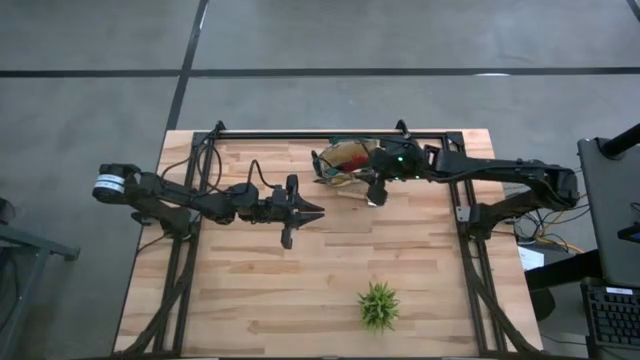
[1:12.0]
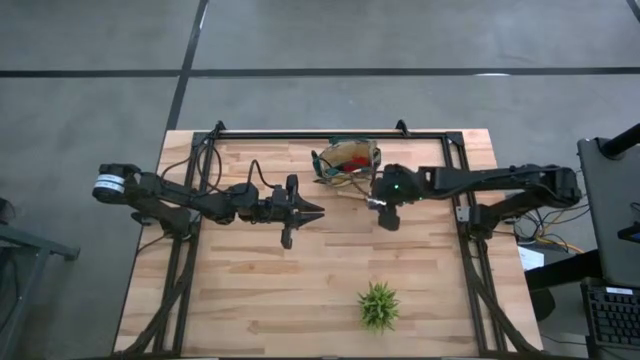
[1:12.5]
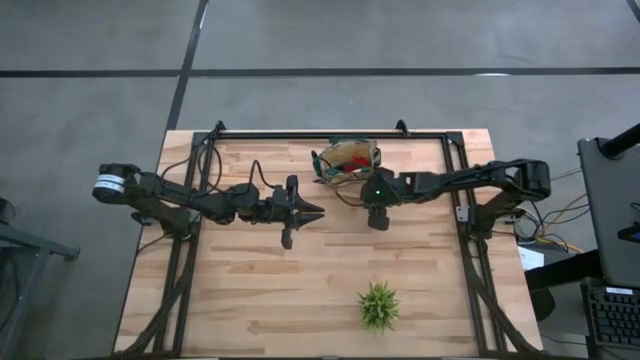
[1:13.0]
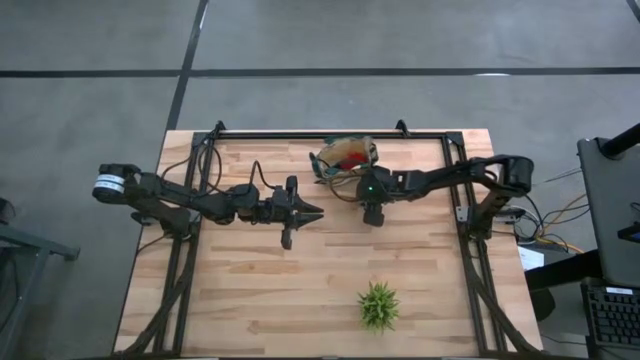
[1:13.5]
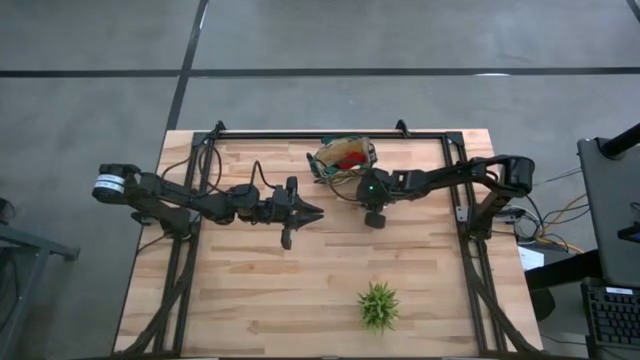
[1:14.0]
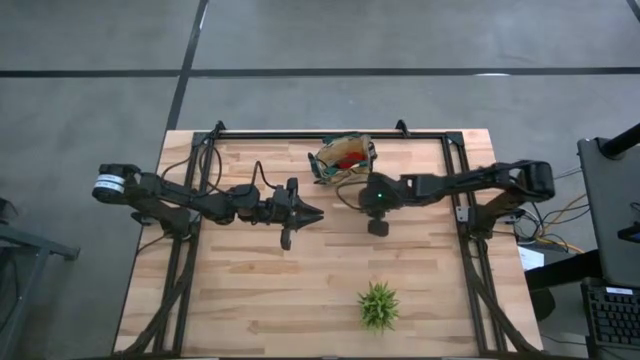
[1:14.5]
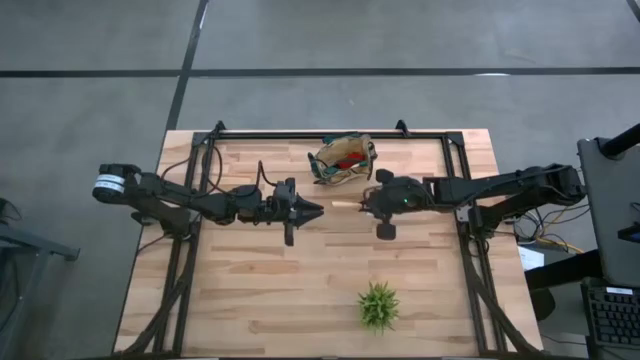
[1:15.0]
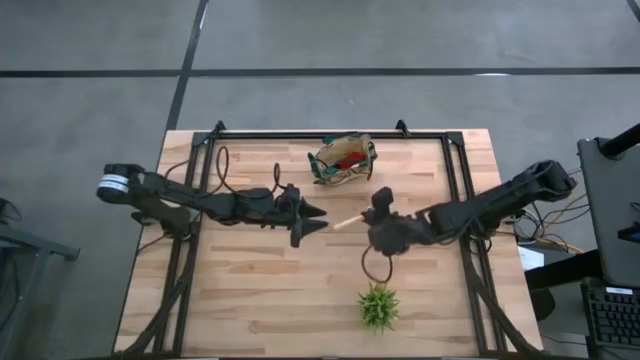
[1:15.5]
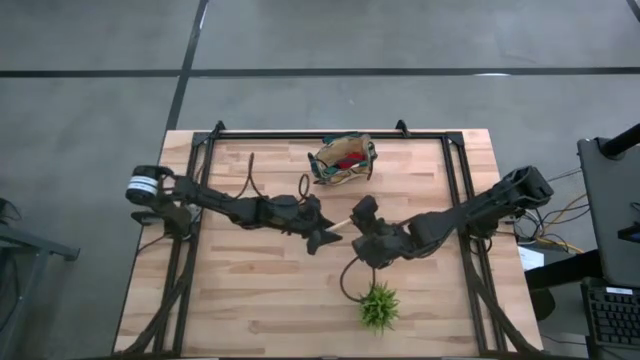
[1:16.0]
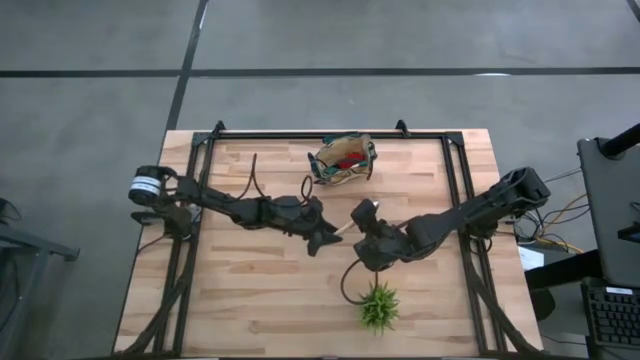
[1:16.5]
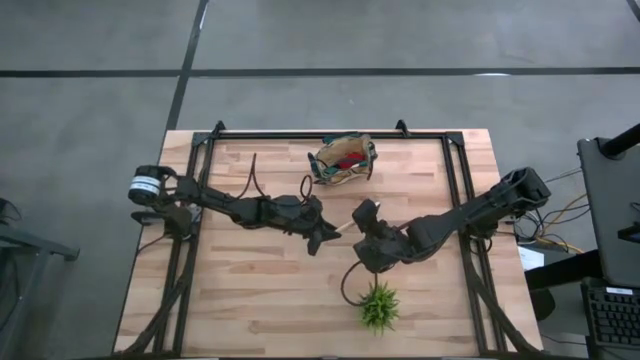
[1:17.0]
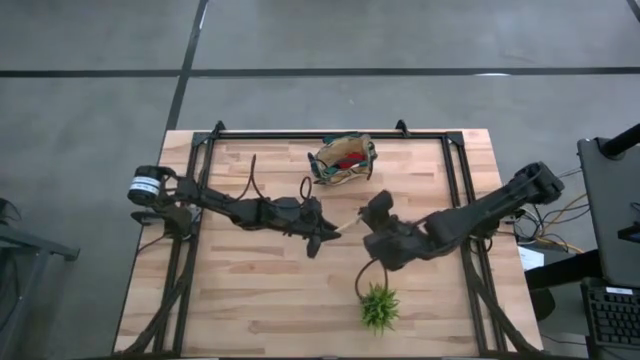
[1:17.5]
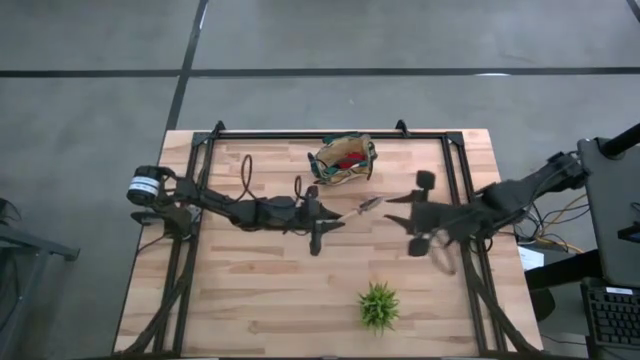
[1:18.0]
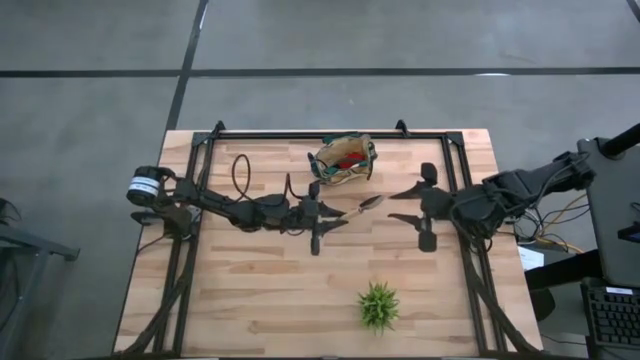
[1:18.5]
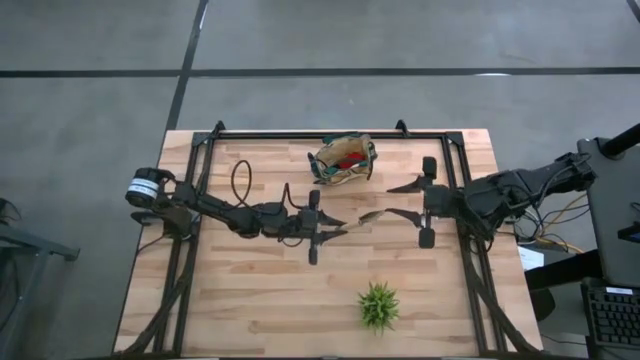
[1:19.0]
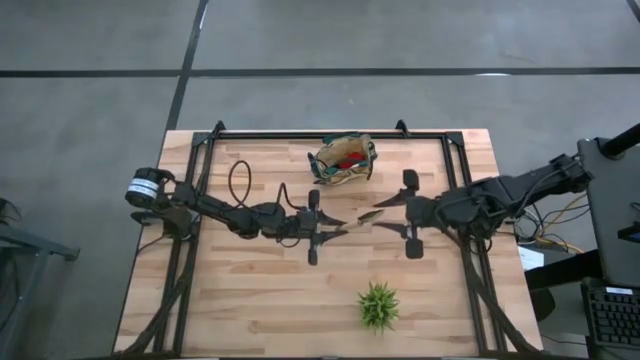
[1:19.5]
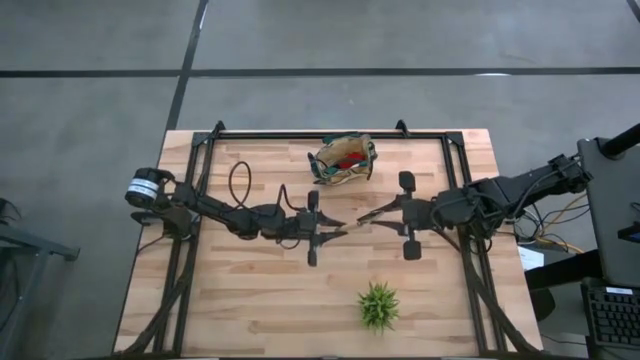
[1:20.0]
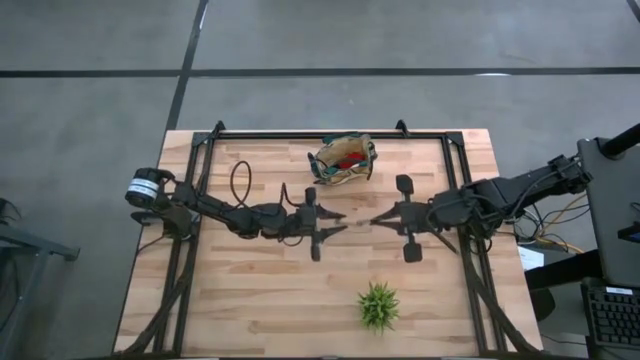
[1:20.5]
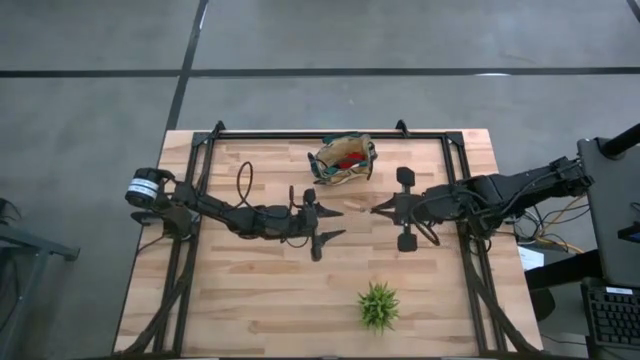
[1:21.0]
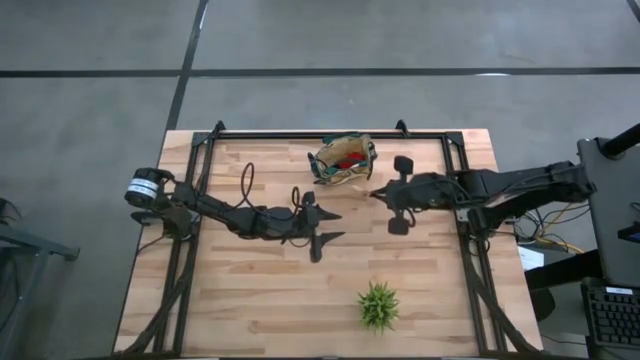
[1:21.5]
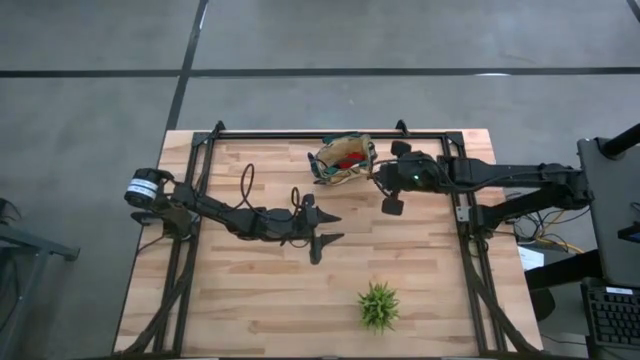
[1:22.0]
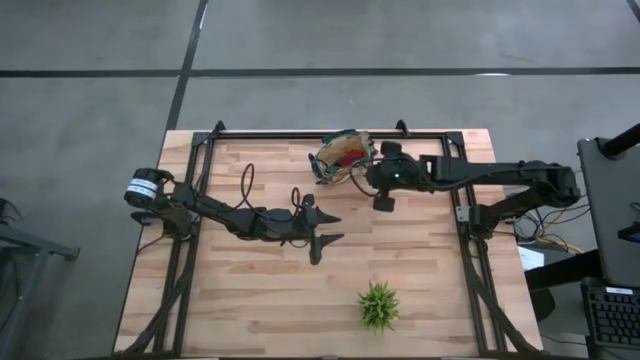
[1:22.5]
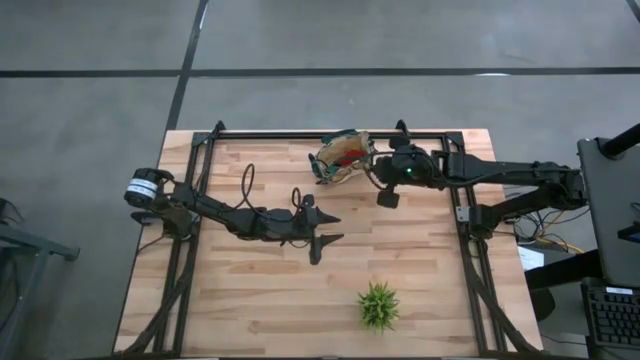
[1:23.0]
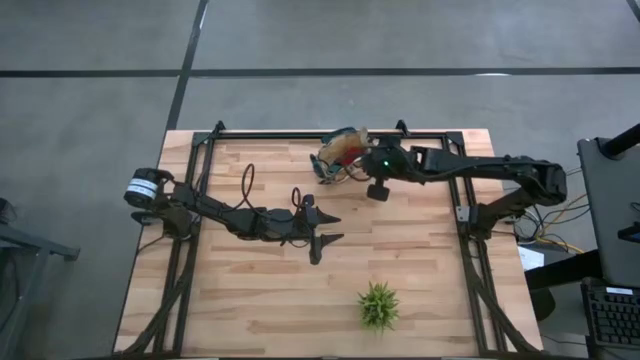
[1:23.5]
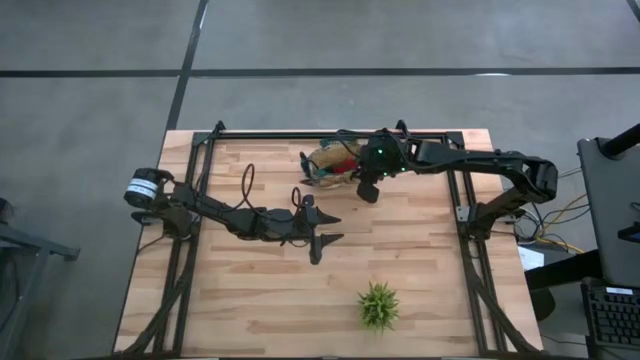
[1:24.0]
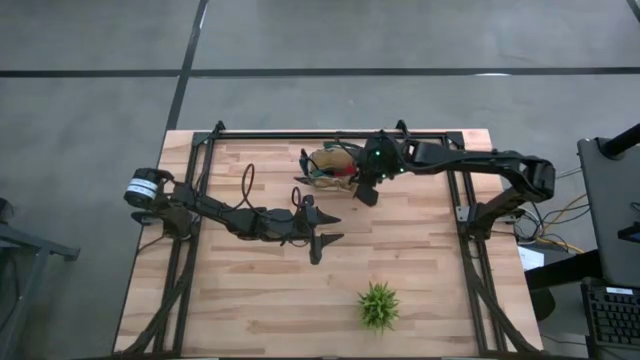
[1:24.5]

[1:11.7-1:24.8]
Task: Pick & Place Garden tools in Gardening bag
Put the brown trowel into the gardening bag

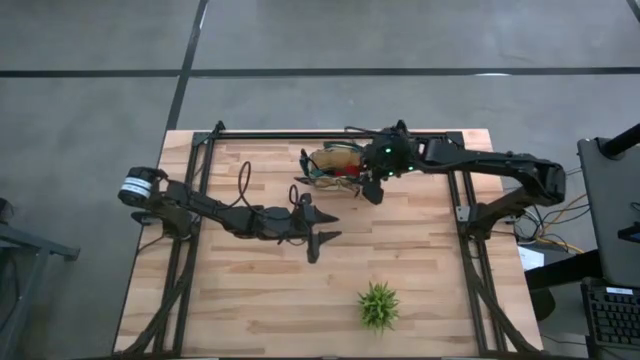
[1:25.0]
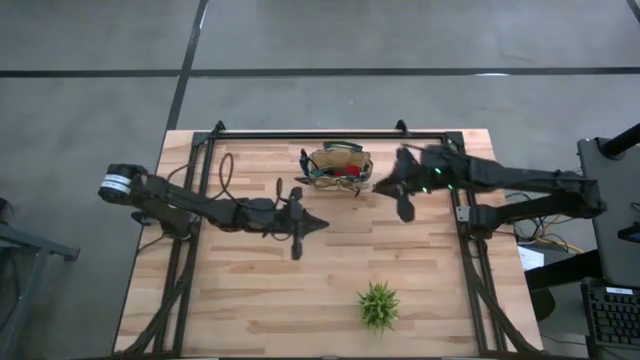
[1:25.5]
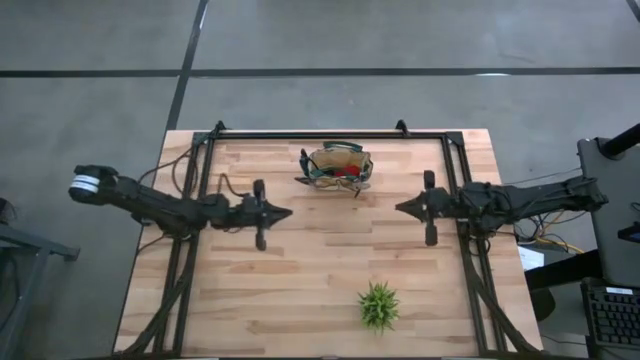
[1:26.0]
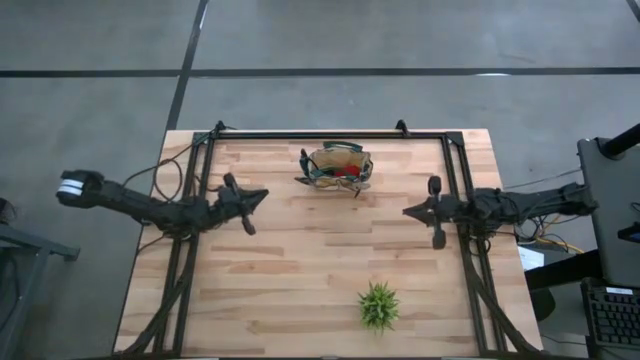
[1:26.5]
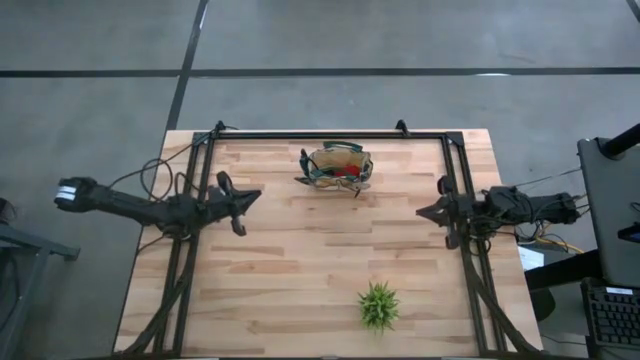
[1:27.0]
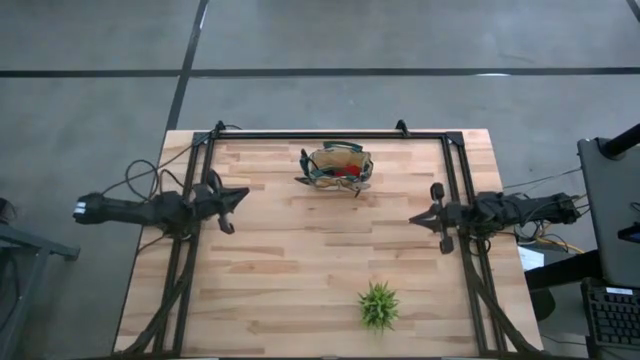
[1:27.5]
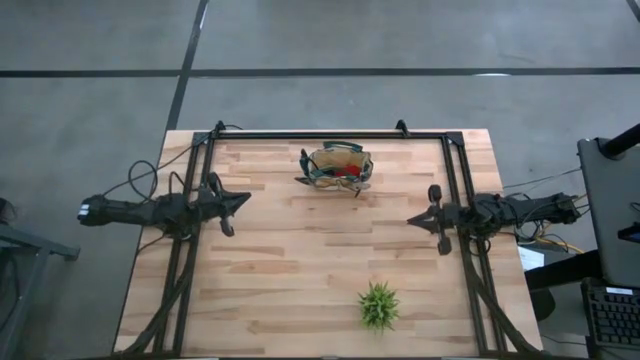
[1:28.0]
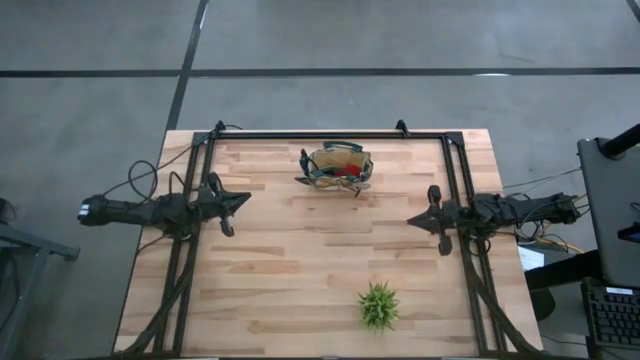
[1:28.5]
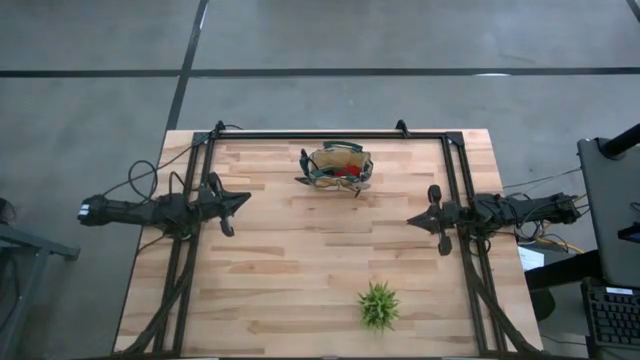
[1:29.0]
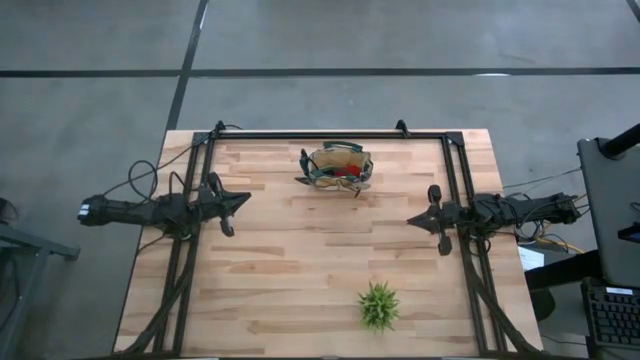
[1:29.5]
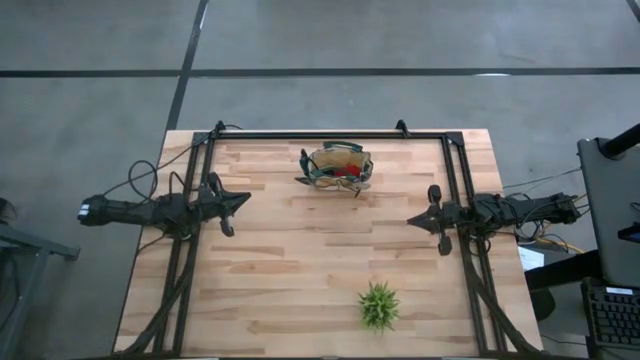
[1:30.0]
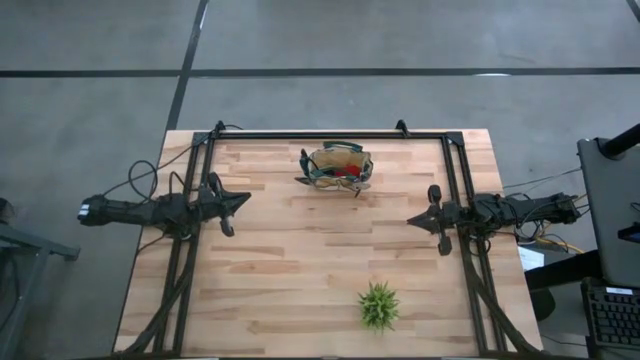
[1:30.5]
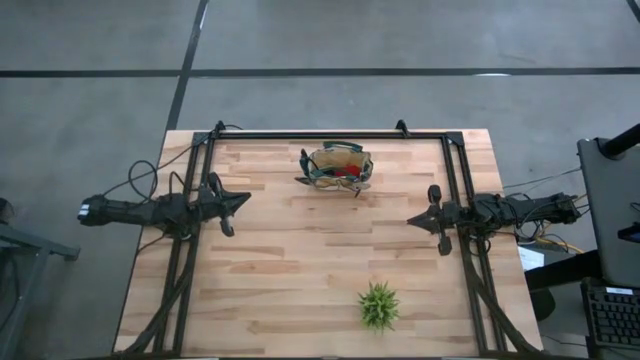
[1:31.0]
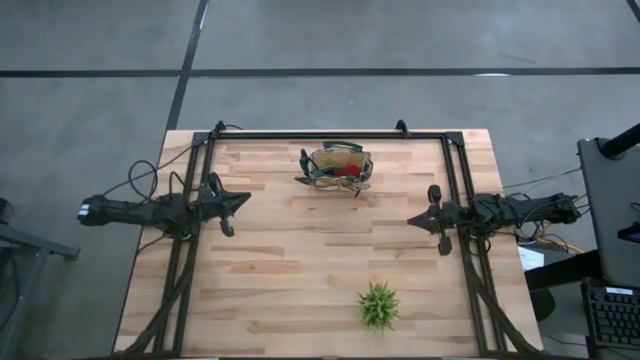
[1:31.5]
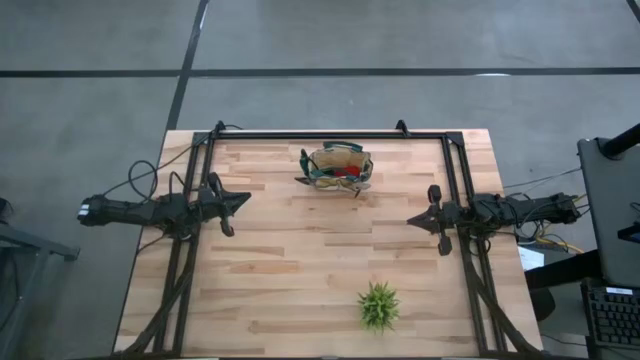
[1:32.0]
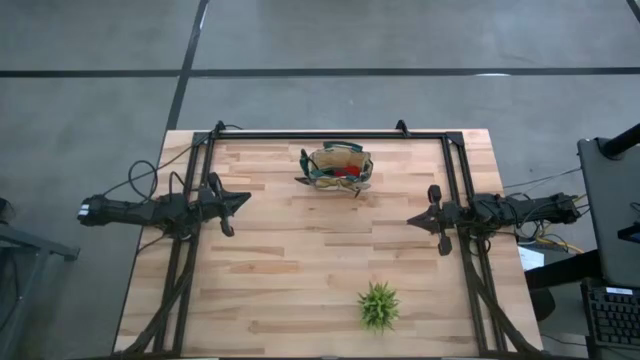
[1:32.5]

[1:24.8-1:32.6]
Return to Home Position

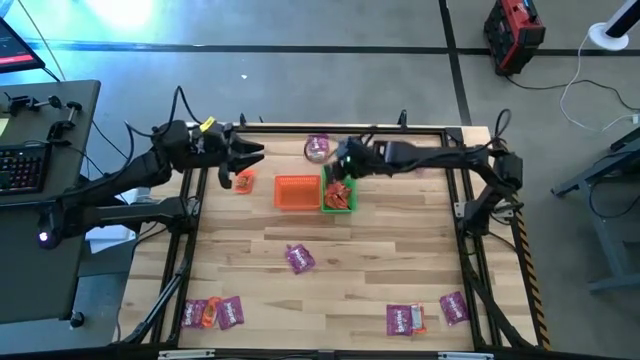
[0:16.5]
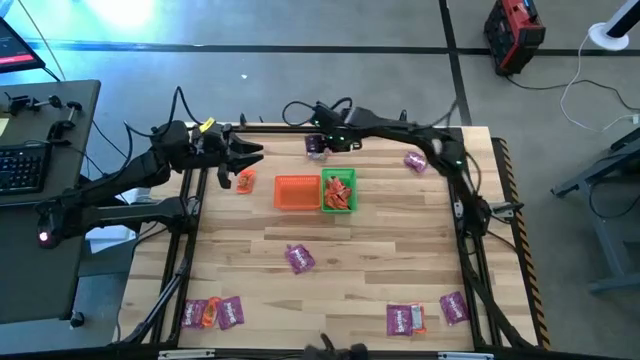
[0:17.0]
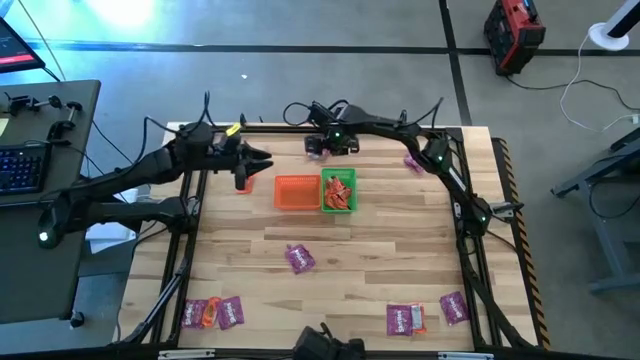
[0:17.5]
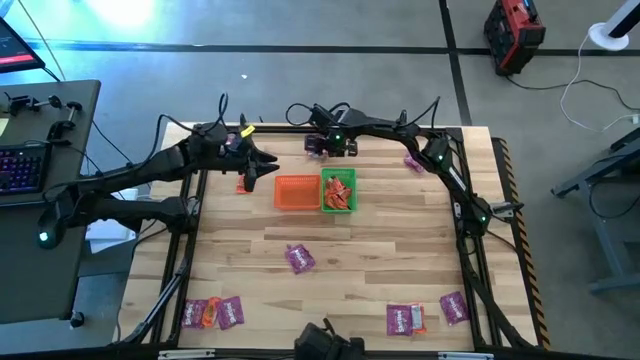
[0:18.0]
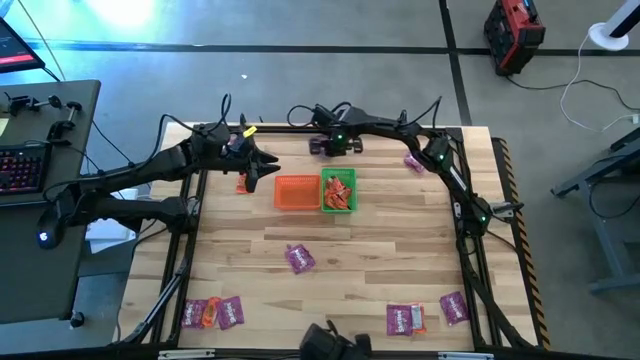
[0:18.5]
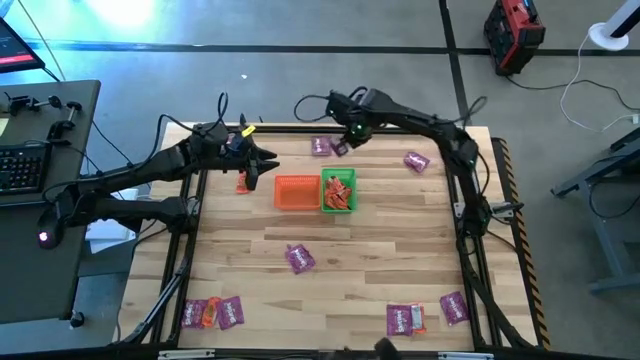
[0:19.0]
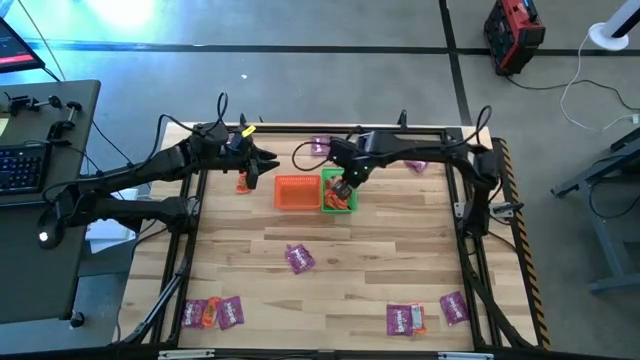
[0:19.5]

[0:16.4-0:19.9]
Task: Sort candy by brand, put in halloween buckets
Put the orange chocolate into the green bin
